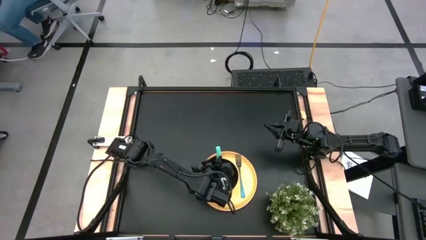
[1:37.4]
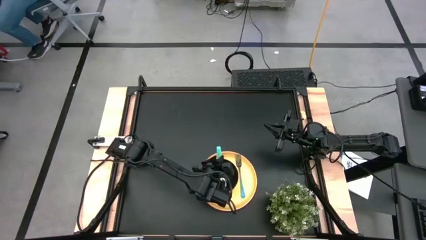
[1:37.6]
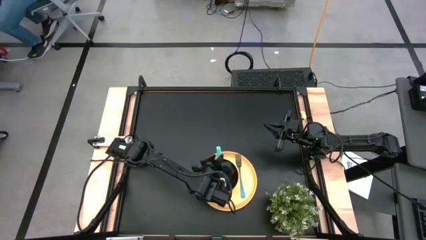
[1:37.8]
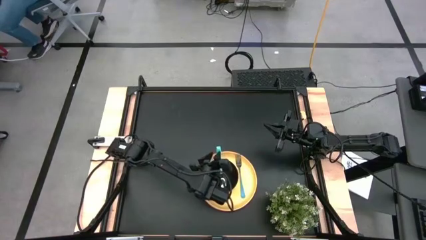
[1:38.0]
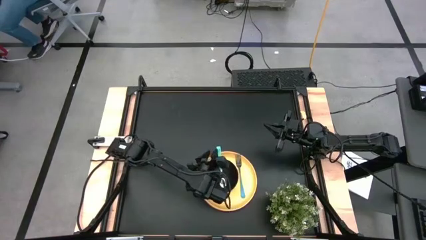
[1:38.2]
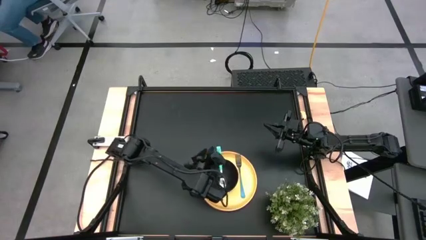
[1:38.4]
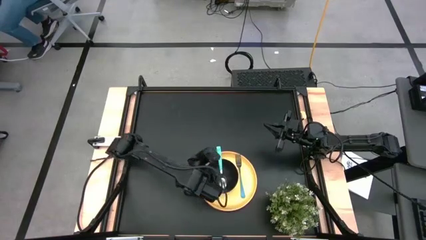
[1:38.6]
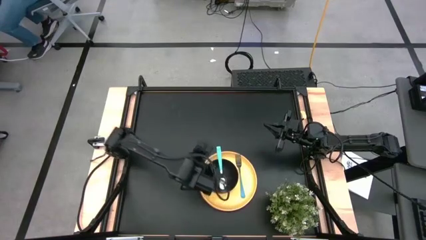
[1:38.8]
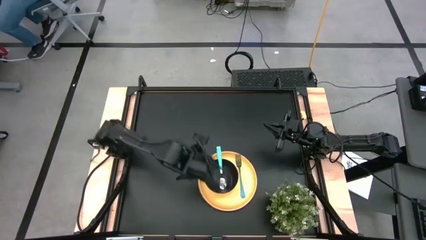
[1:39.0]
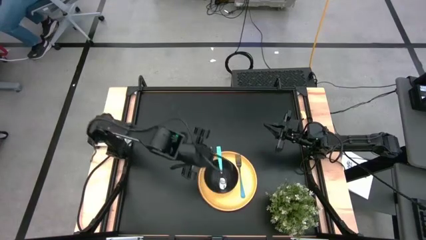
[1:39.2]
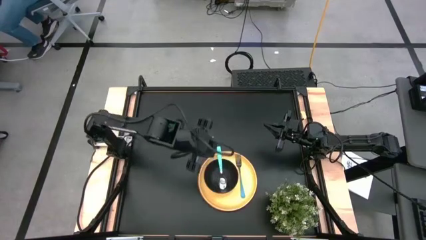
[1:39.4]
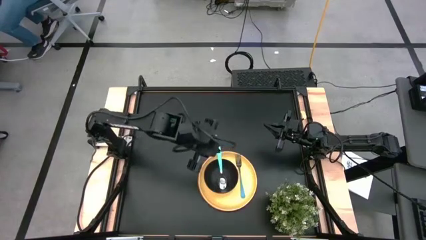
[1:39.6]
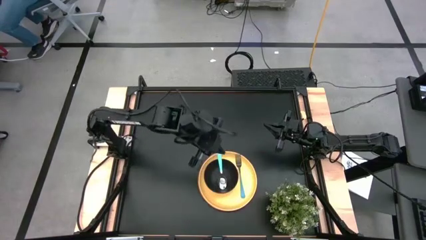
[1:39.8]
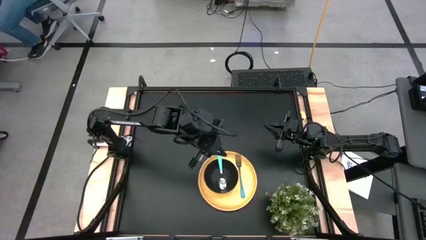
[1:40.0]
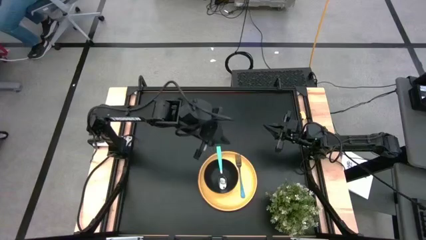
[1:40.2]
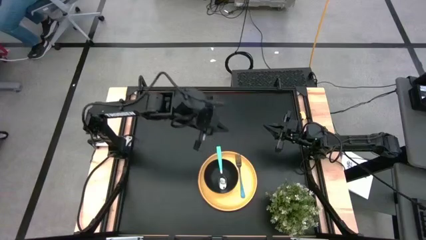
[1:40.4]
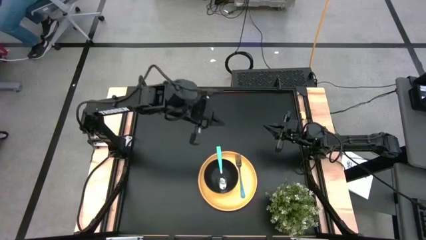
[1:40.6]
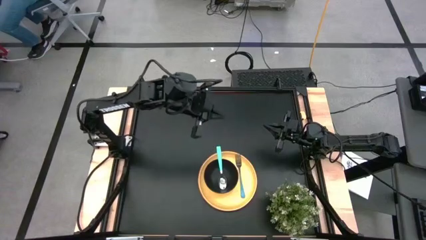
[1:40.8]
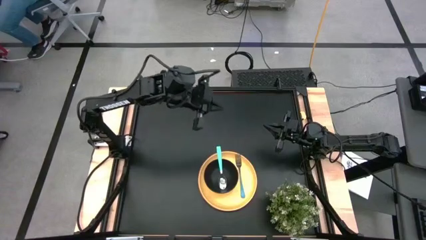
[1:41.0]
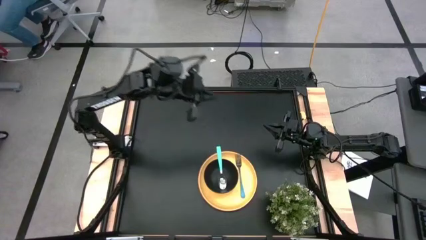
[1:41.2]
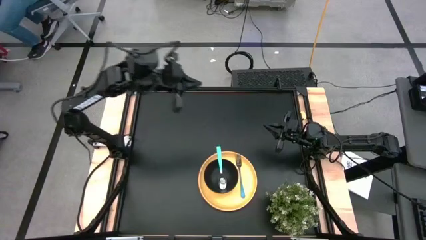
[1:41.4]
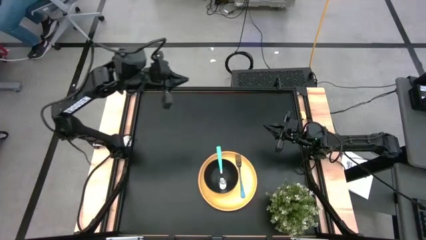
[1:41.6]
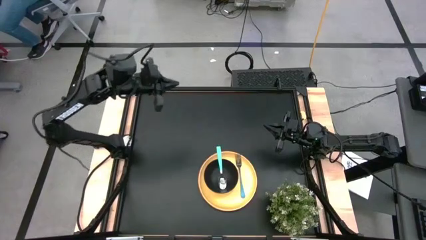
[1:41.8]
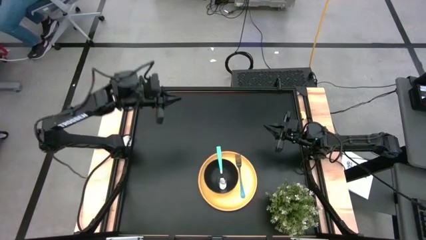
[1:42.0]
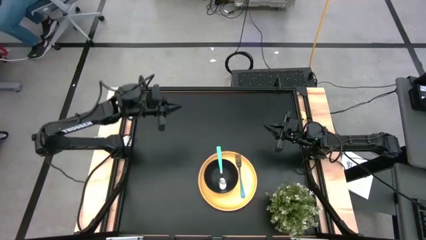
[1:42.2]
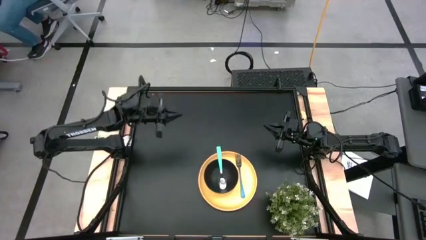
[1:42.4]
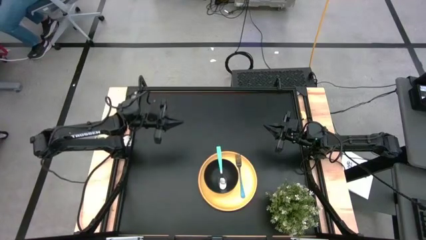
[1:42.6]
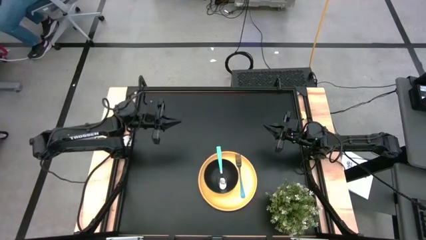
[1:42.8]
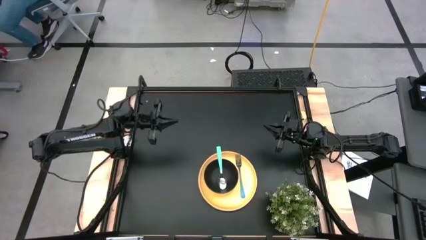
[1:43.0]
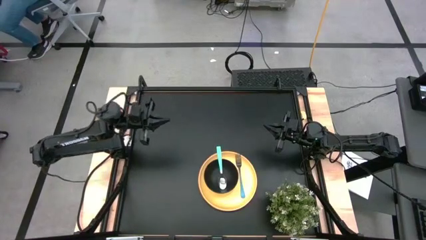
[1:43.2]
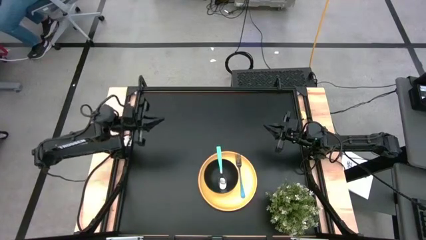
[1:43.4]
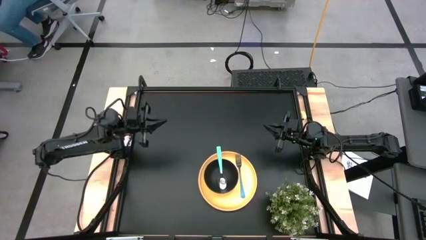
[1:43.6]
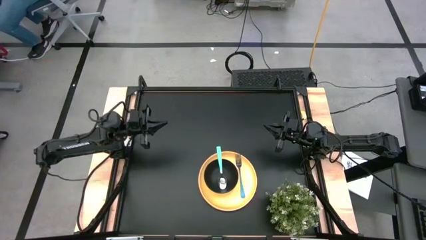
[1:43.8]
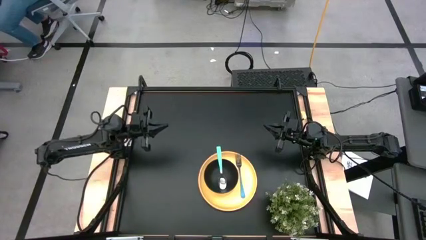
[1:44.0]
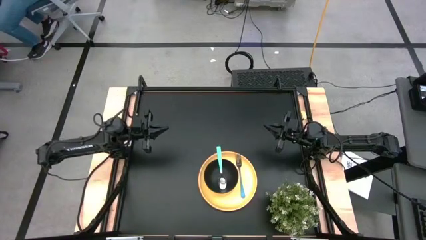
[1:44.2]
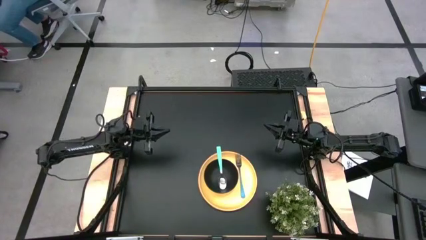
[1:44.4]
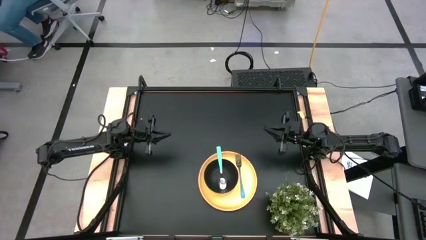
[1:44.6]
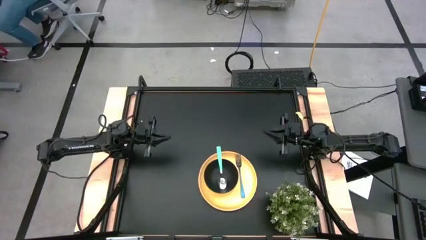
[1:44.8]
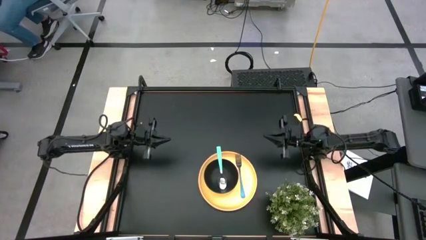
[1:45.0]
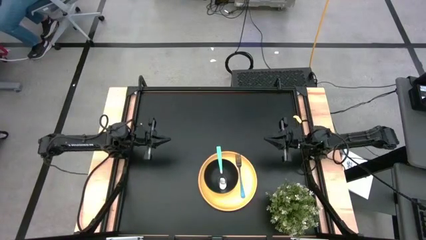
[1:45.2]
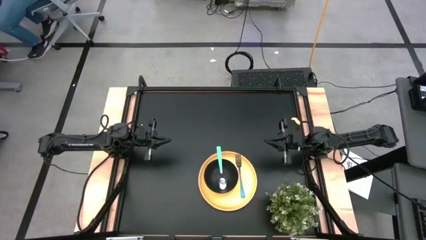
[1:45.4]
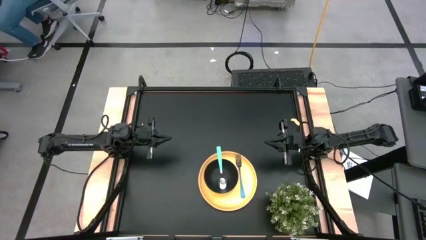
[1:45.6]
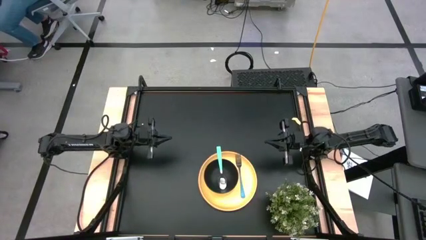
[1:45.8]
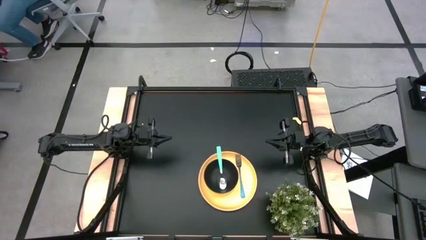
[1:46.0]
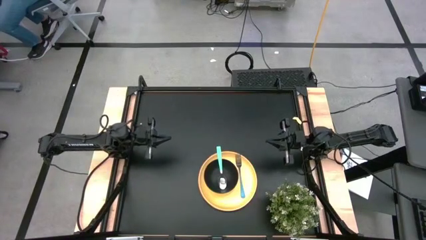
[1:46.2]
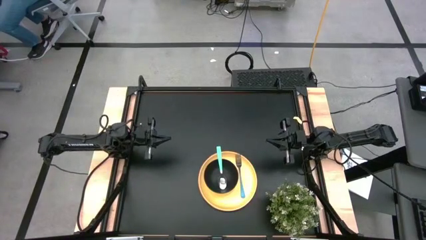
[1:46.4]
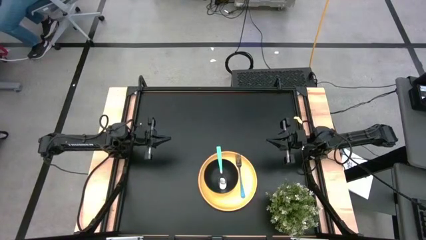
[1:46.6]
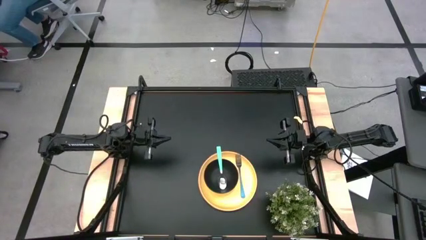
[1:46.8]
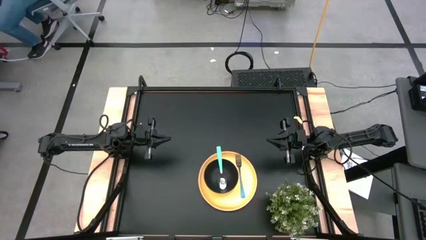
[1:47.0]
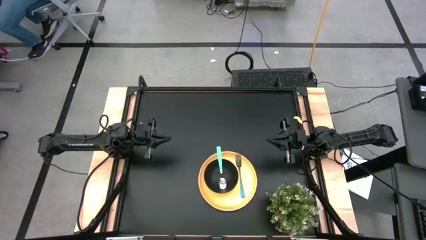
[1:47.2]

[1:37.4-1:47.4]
Task: Pick and place plate/cup/fork/spoon on tray
Return to Home Position
